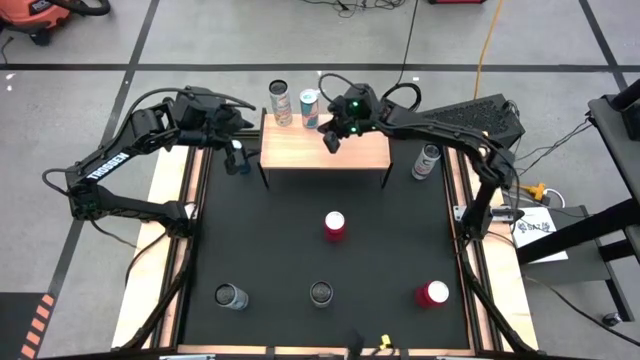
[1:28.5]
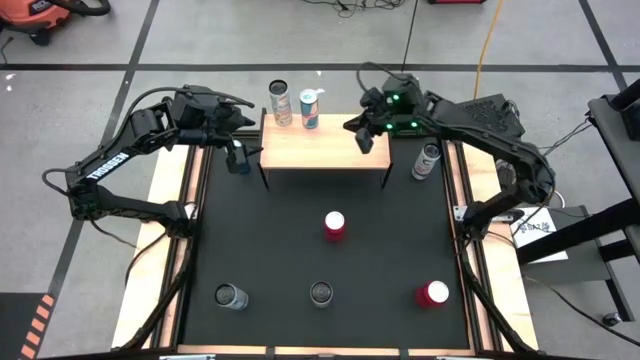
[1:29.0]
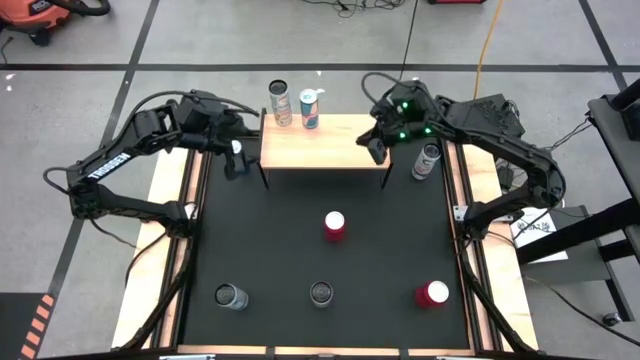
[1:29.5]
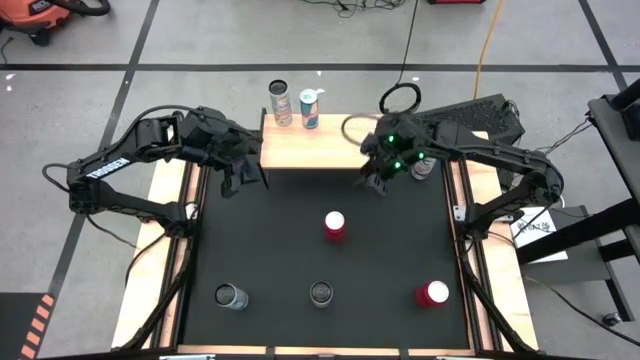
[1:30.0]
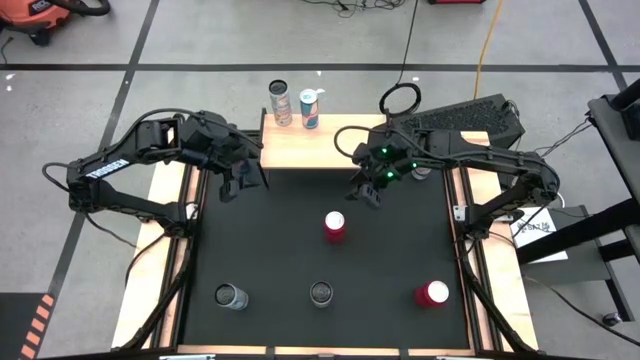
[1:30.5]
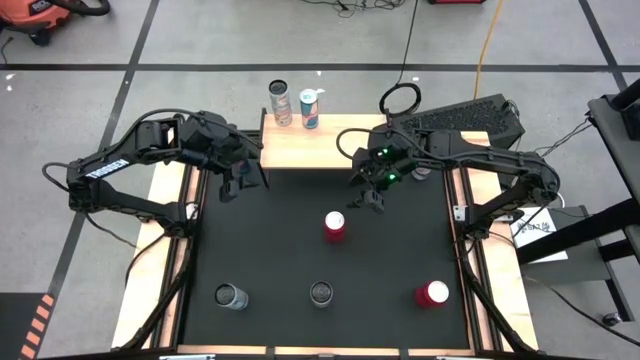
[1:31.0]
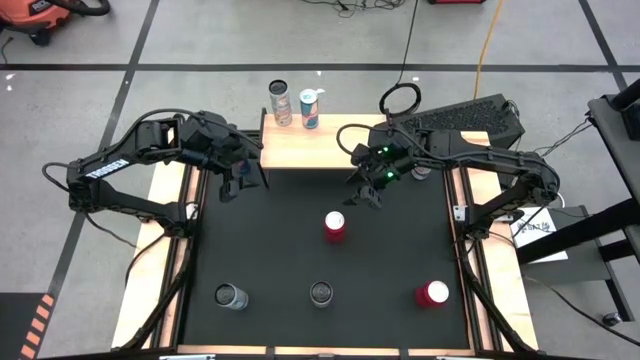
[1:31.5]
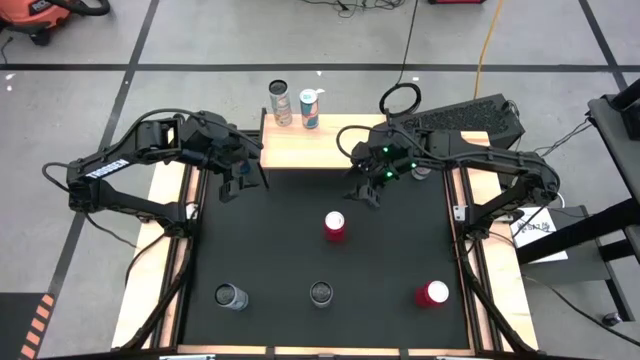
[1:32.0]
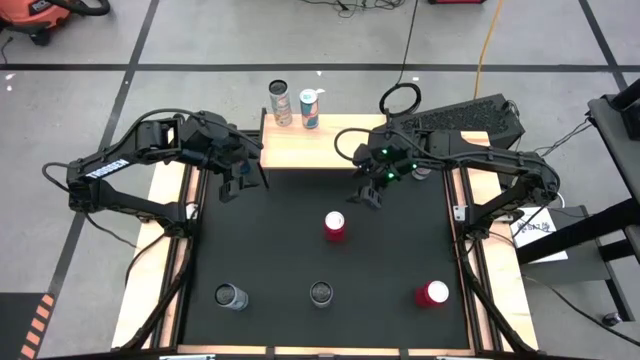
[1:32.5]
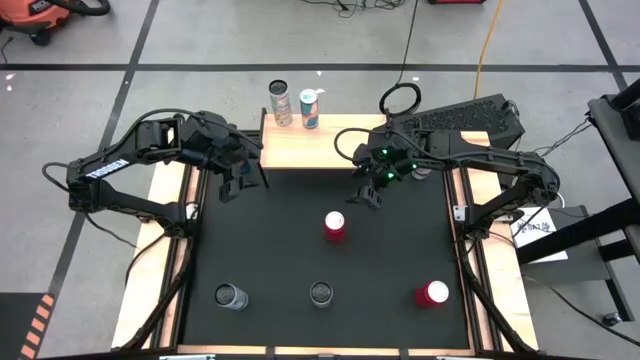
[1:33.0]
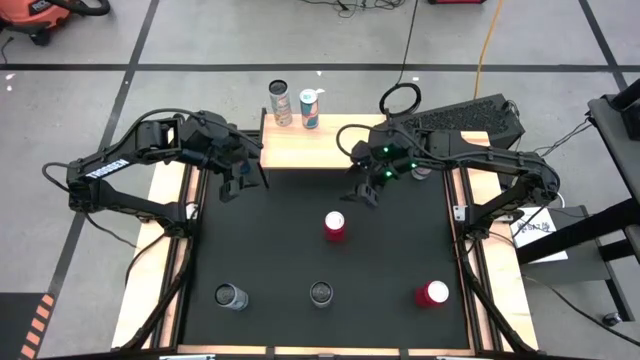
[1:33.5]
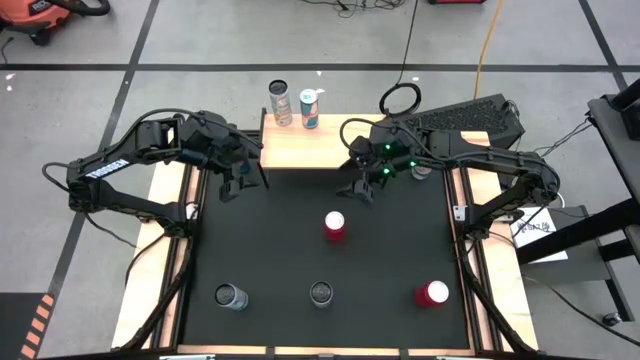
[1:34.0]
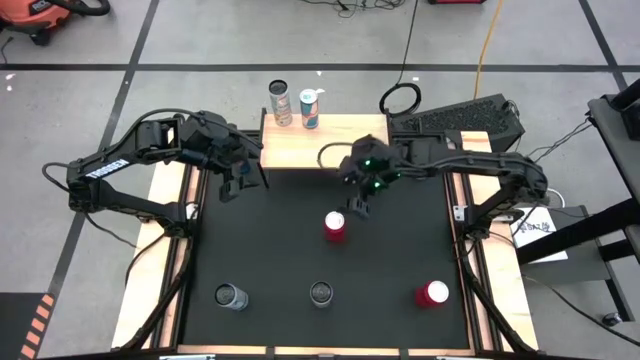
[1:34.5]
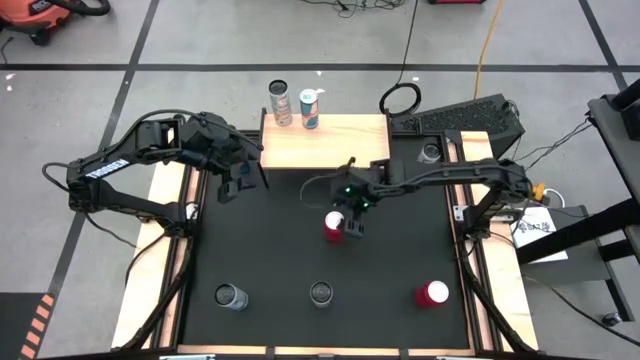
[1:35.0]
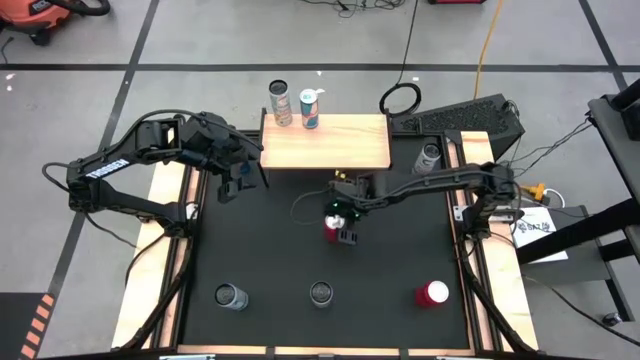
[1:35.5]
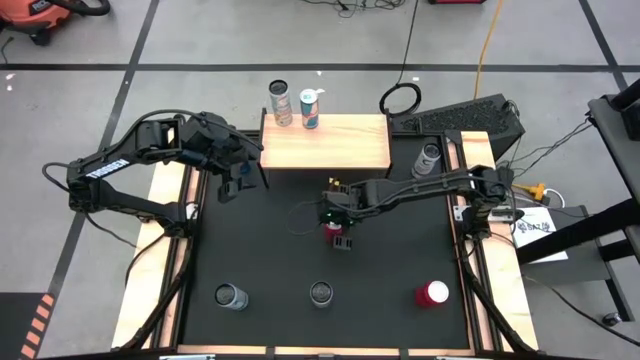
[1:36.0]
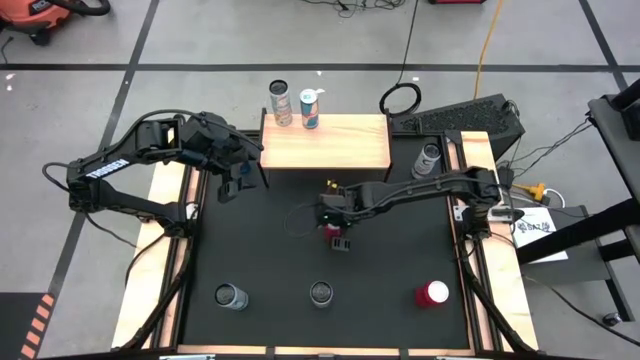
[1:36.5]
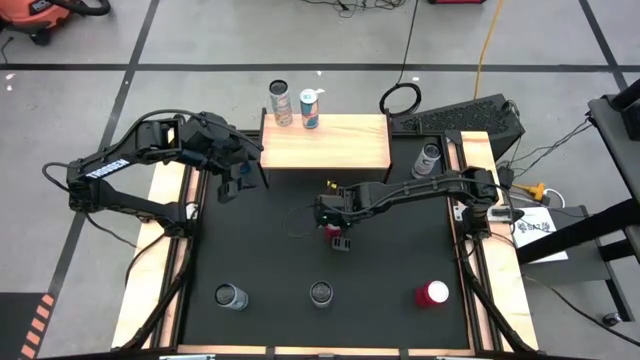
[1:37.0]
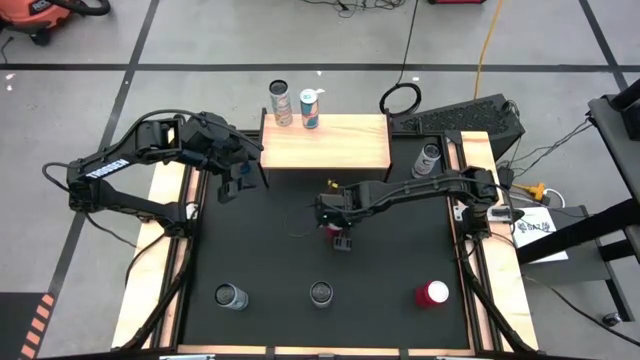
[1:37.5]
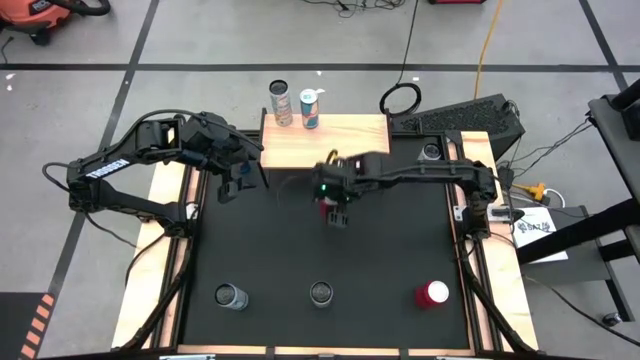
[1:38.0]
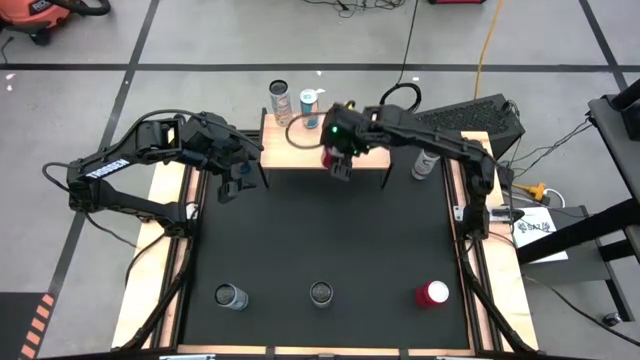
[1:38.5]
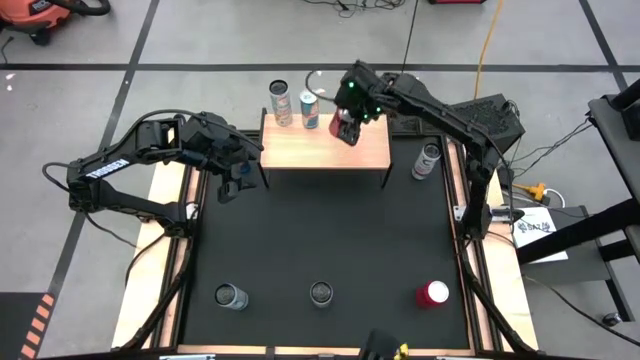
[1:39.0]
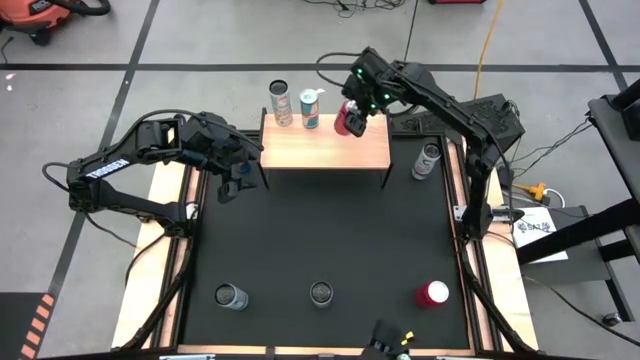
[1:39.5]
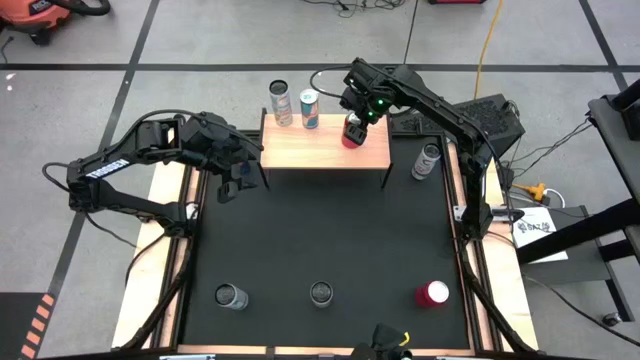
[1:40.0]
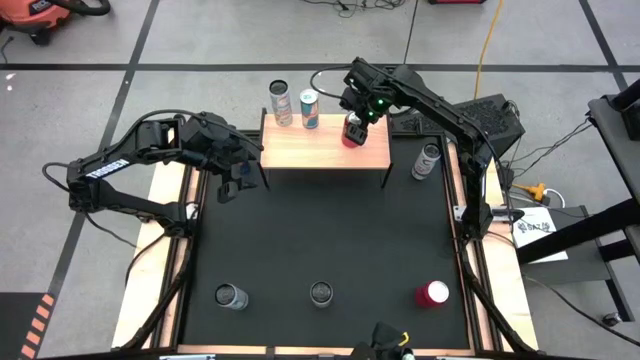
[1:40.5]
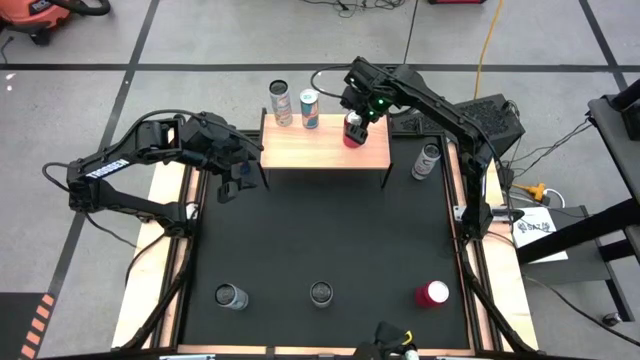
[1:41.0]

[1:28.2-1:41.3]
Task: Place canned beverage on shelf
Put the top red-black soda can on the shelf

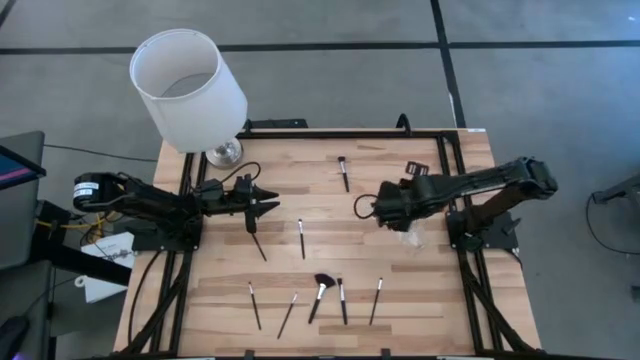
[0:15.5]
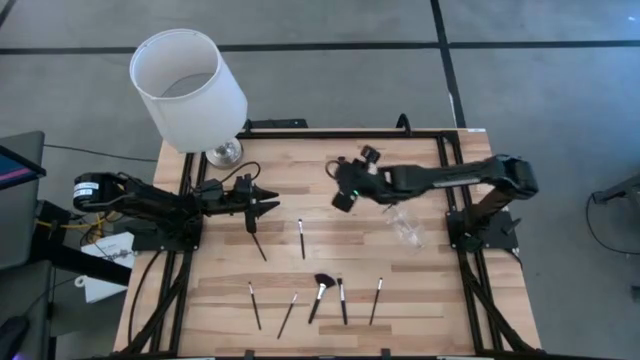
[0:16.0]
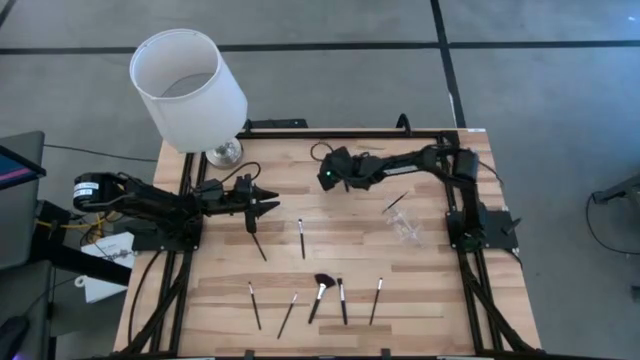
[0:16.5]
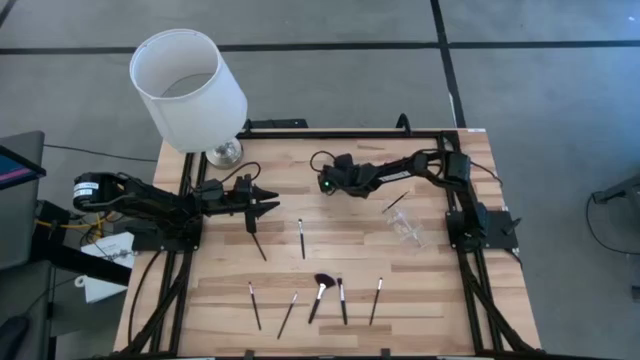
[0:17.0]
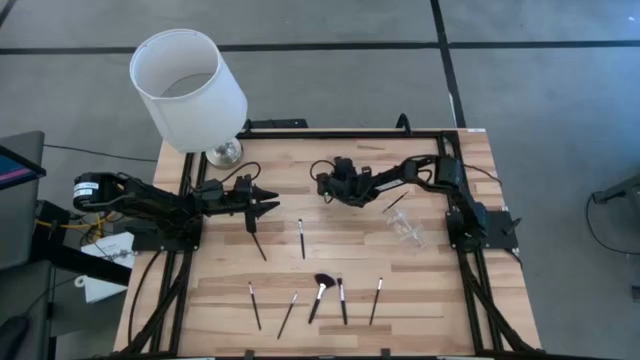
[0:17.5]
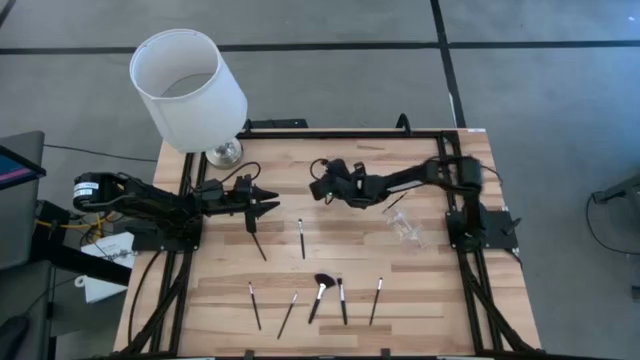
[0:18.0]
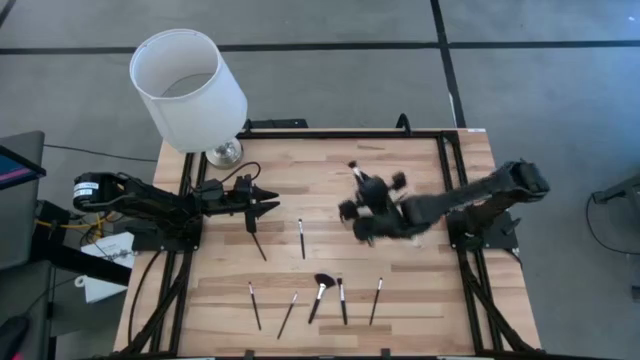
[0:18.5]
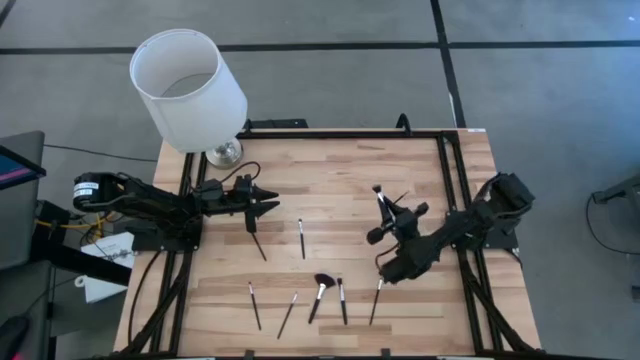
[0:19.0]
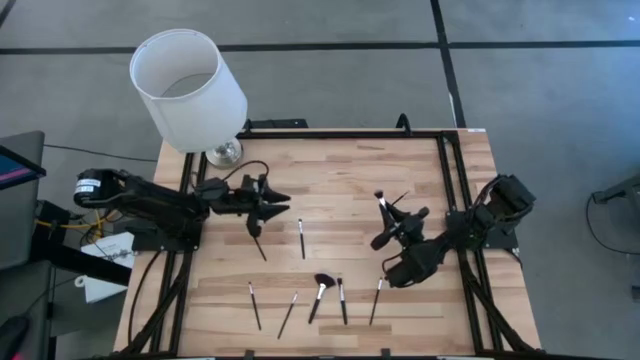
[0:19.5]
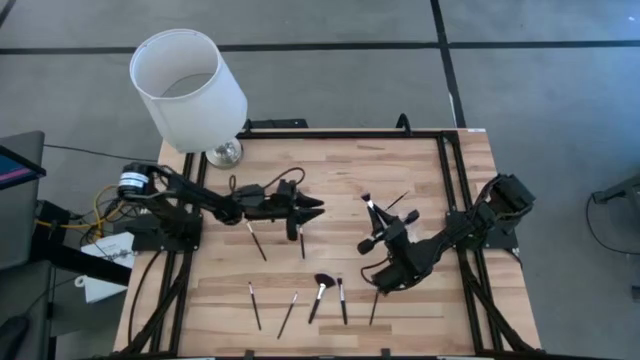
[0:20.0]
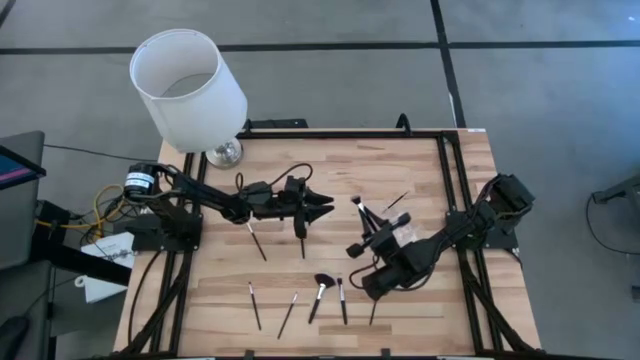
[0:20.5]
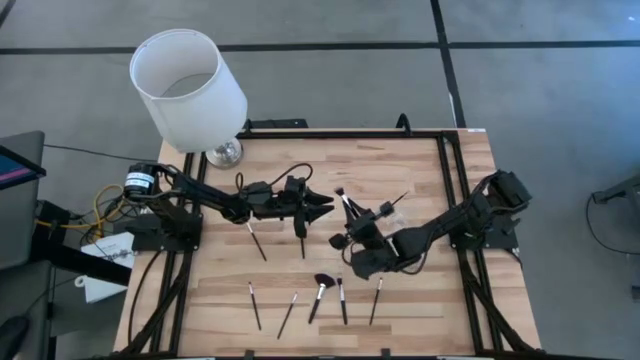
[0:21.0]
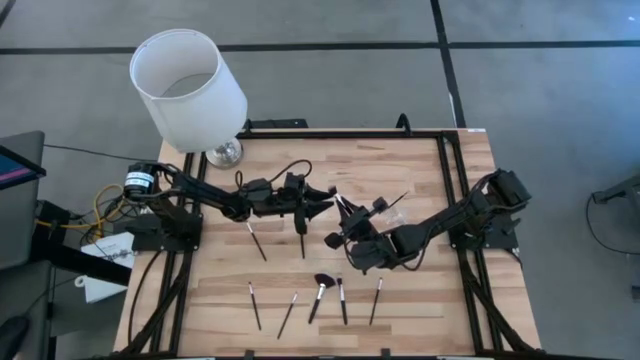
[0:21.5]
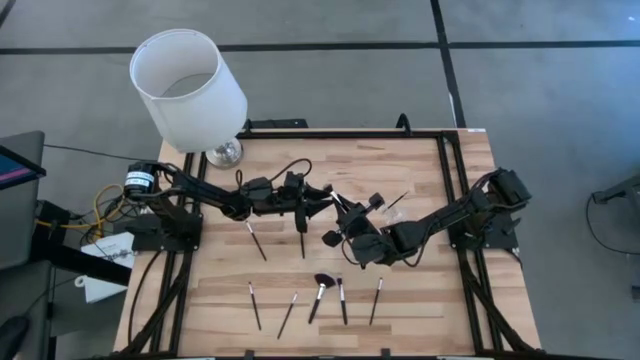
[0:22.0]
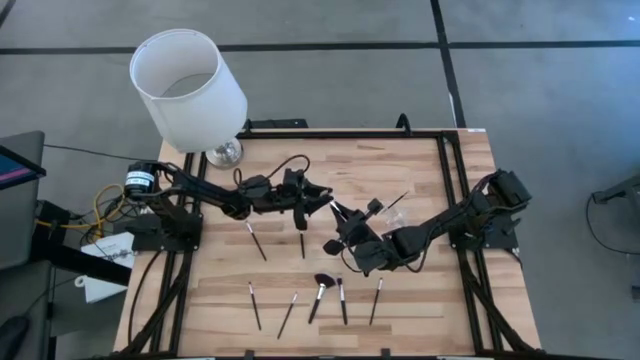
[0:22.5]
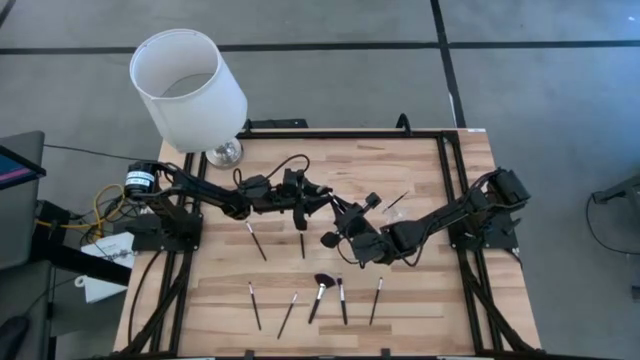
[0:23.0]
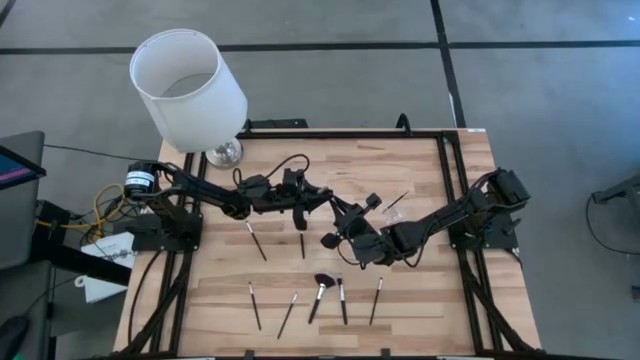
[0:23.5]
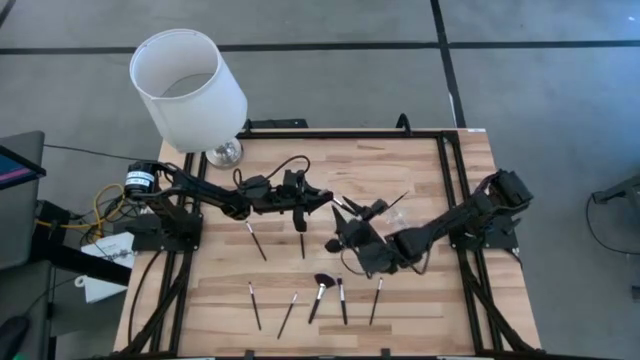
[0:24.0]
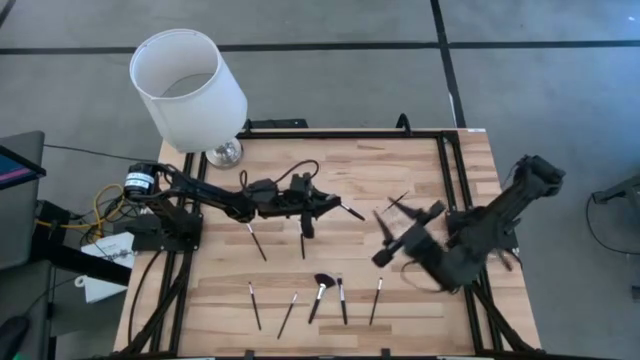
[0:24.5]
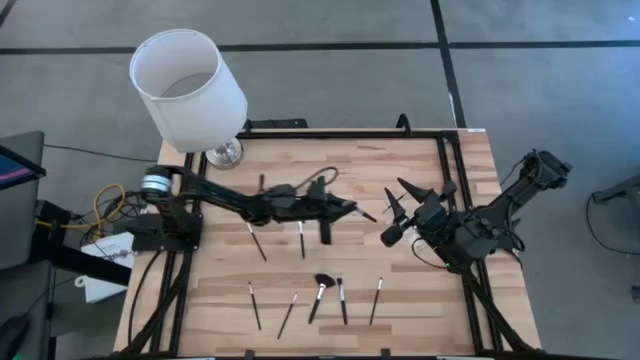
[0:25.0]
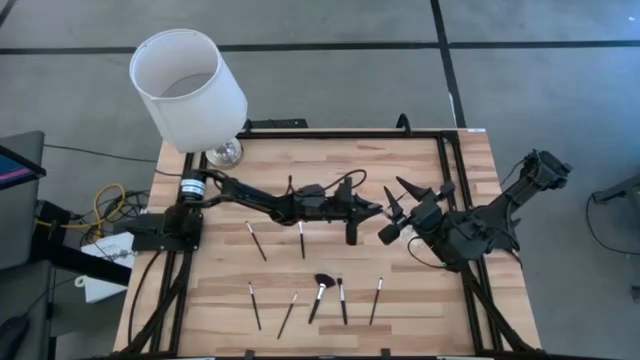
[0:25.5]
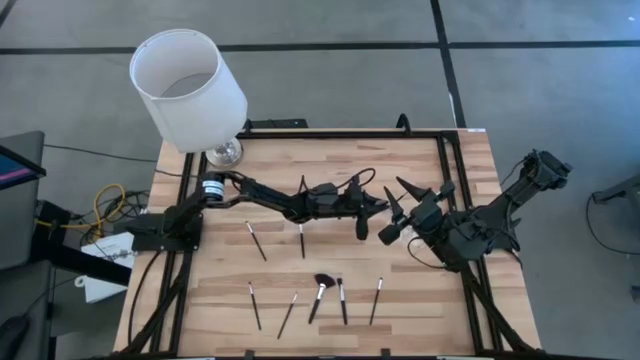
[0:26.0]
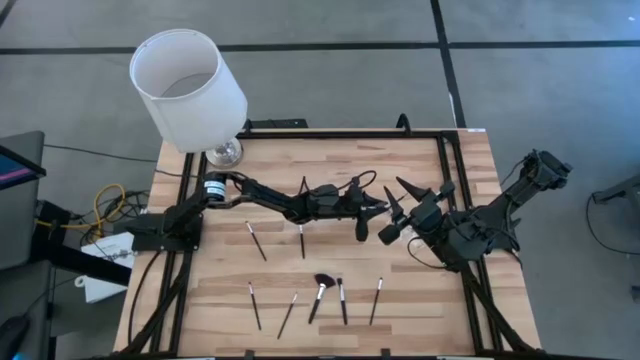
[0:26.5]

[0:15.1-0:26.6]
Task: Put items in baskets/containers
Put the powder brush into the transparent organizer
